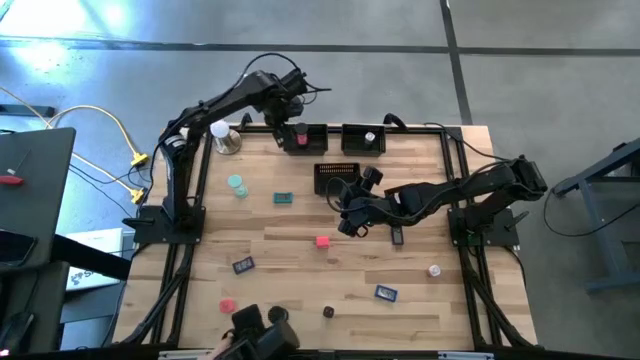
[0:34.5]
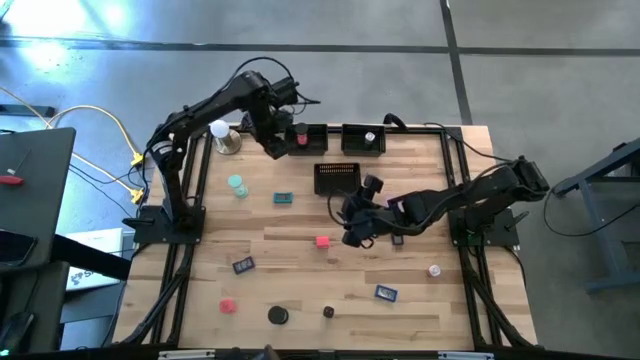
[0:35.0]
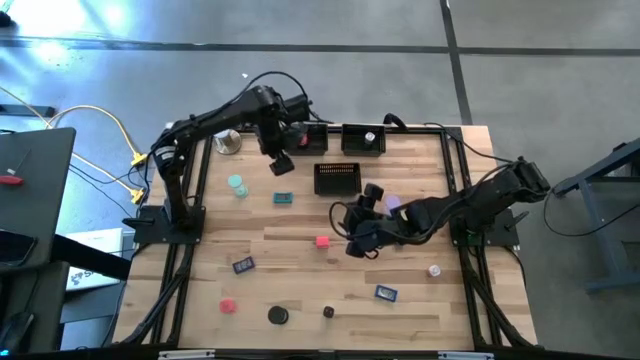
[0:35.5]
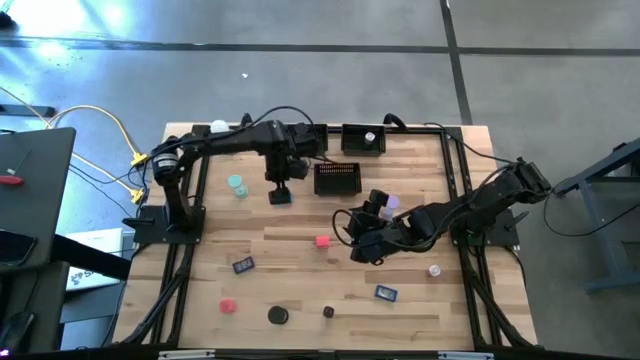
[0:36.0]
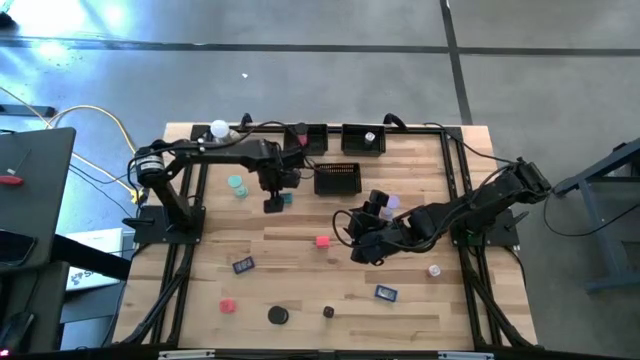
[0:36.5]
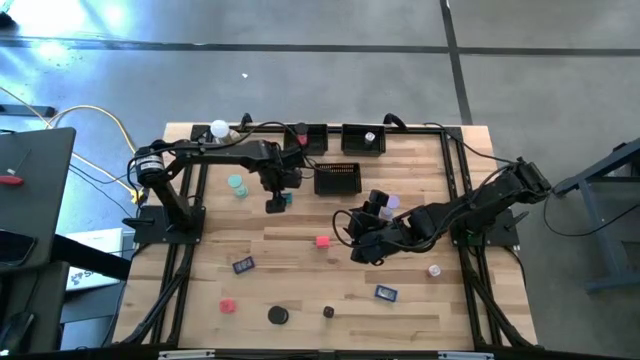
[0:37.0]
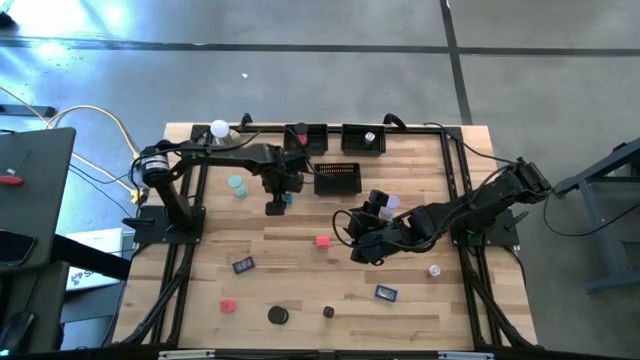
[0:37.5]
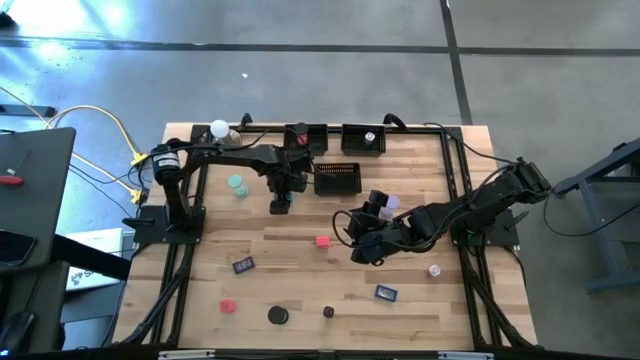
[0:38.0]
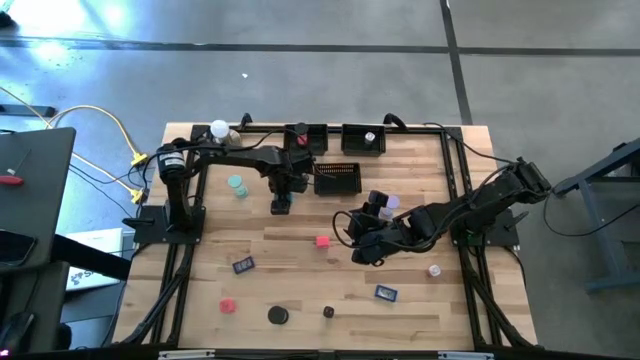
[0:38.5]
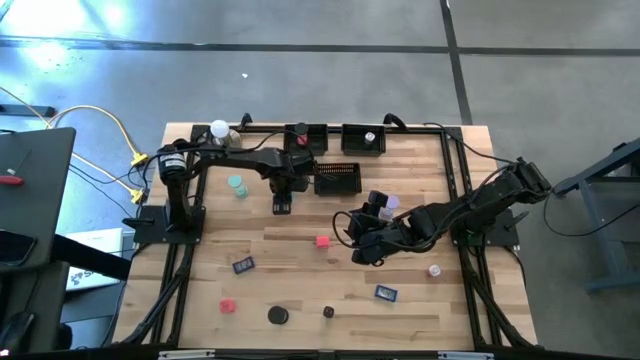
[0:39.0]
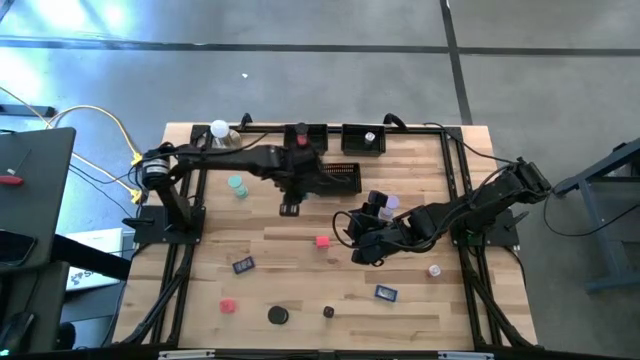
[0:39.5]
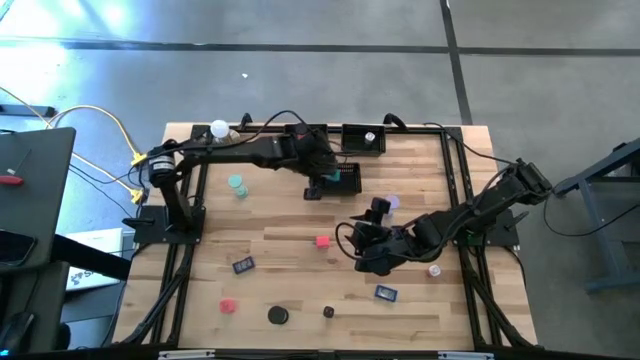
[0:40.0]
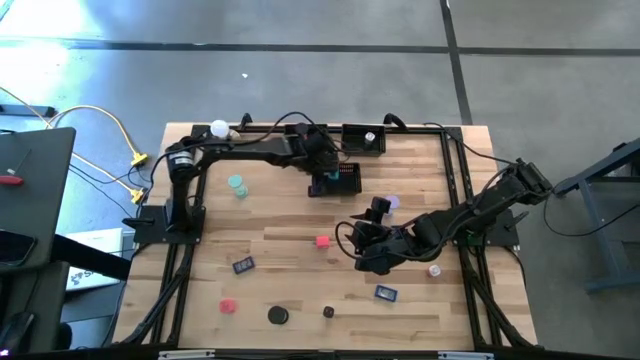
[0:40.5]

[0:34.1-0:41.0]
Task: Pick & Place Office items
Put the light blue digital timer into the bottom black bin

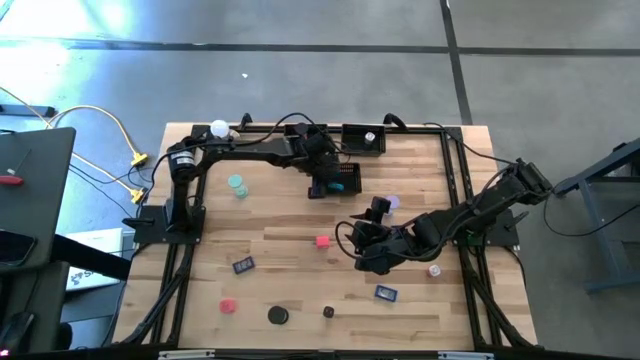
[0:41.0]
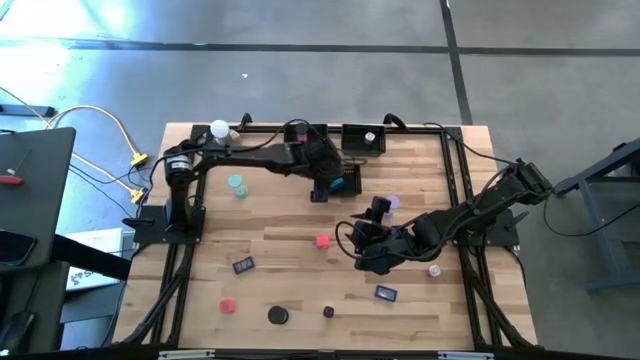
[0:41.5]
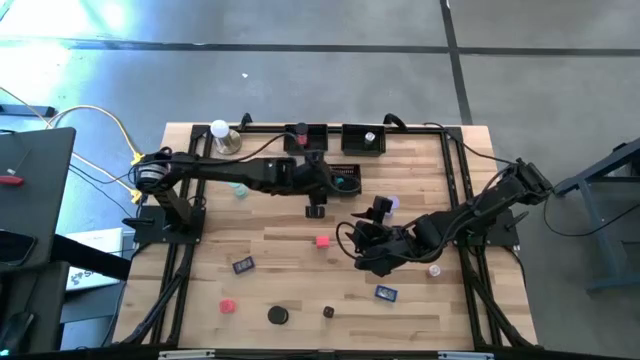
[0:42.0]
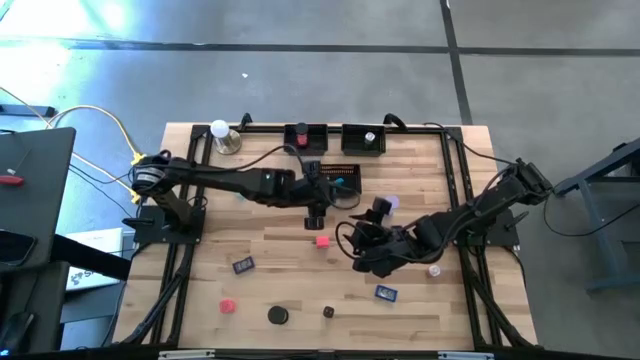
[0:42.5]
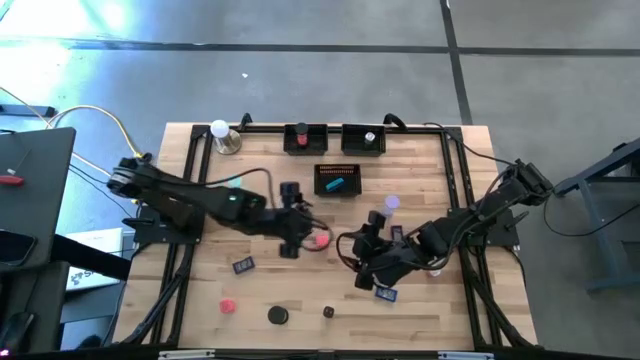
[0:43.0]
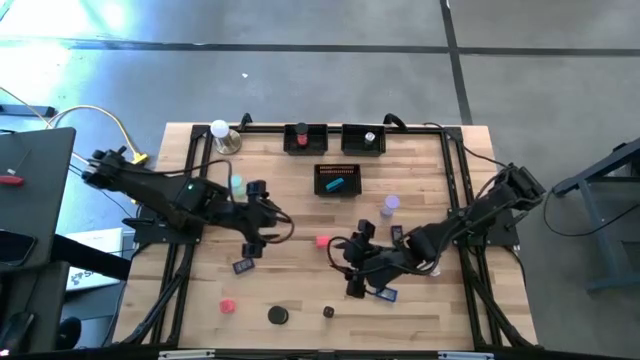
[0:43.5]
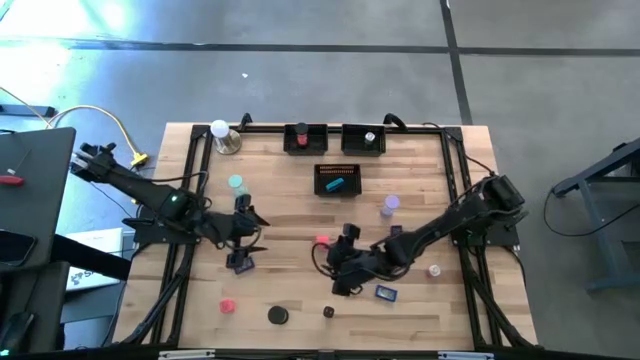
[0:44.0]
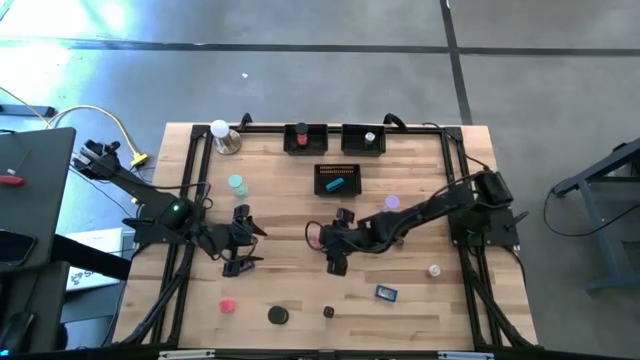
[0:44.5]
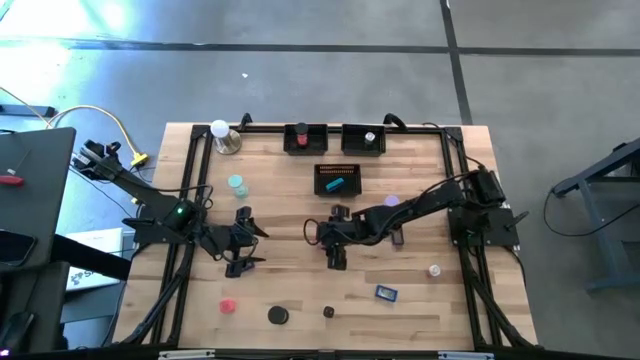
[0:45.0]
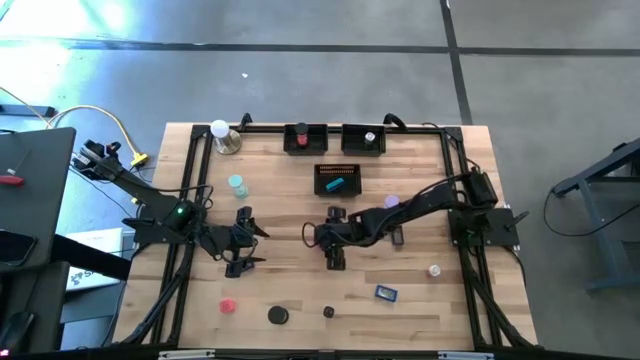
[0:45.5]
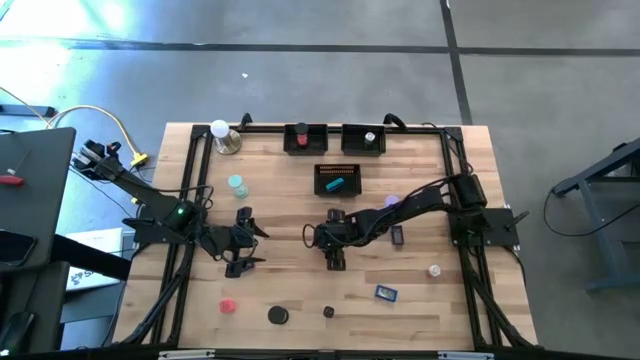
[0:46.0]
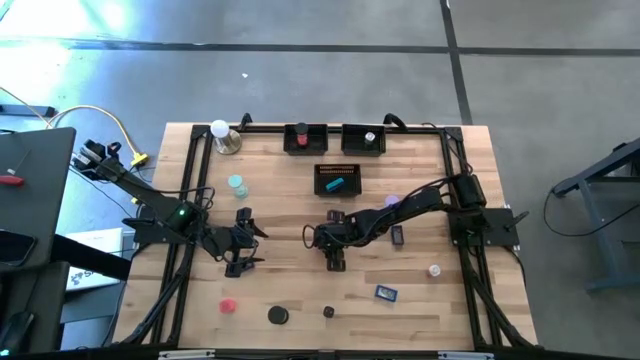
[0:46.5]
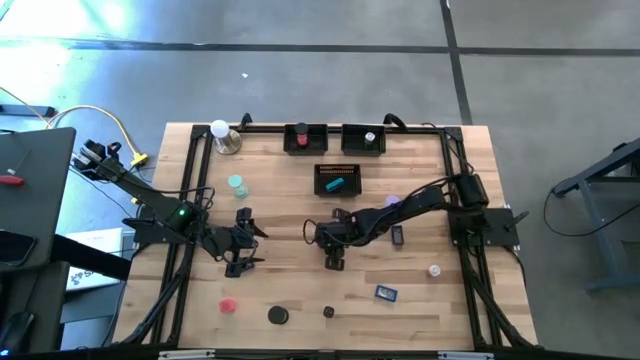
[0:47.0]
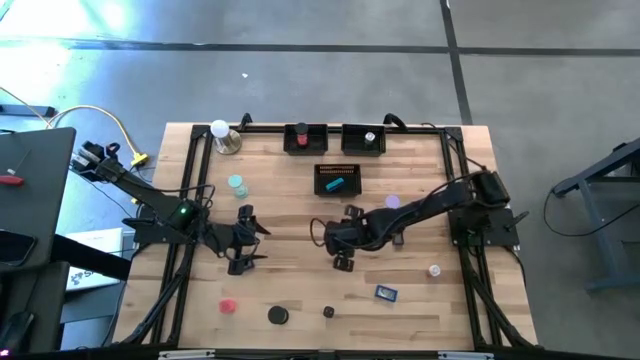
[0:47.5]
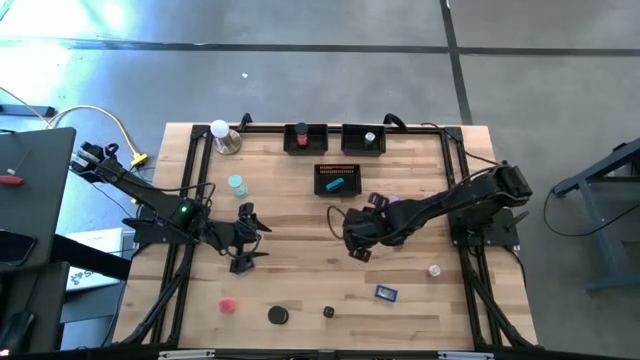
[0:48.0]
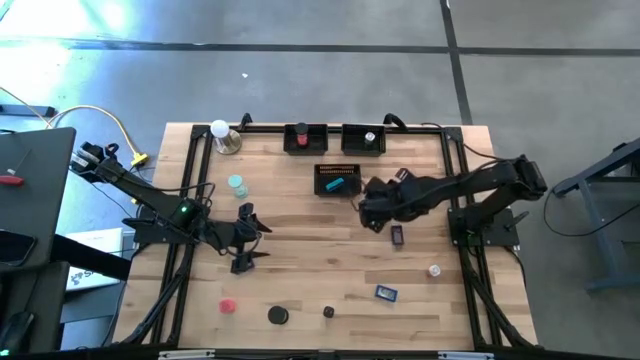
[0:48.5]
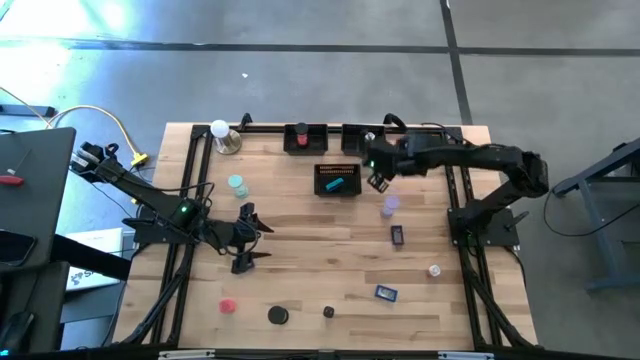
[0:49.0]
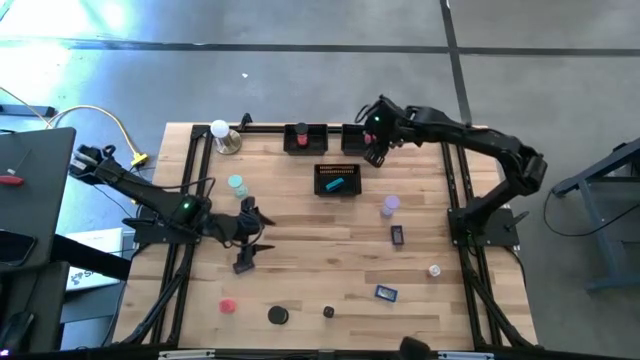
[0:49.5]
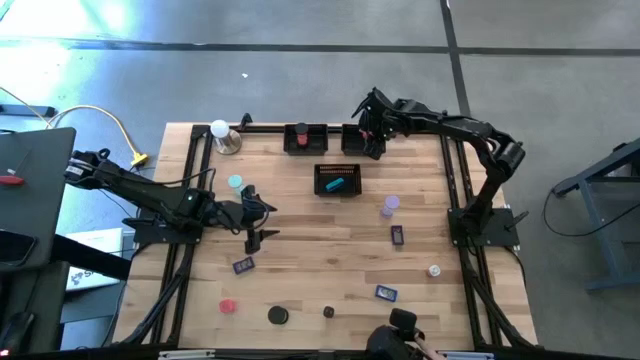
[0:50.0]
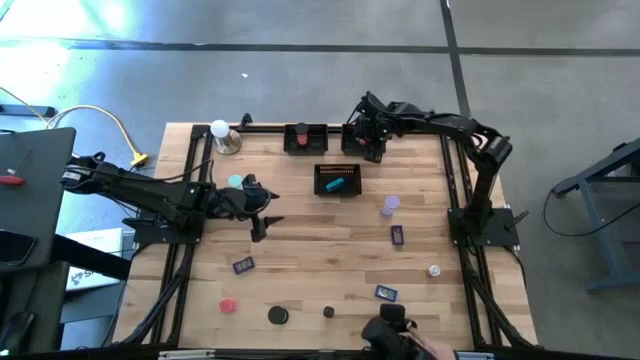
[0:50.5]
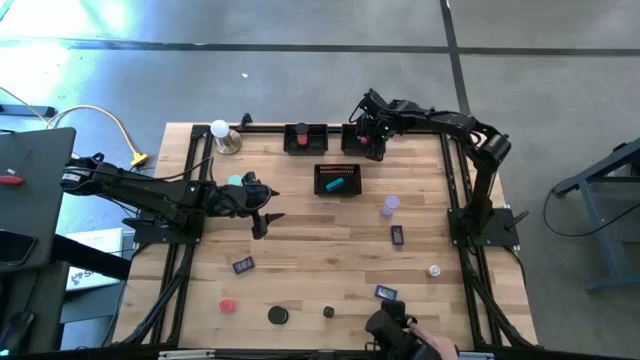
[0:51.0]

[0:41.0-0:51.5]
Put the top pink adapter charger into the top right black bin

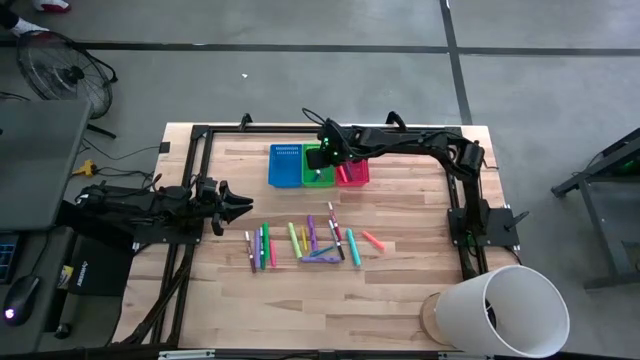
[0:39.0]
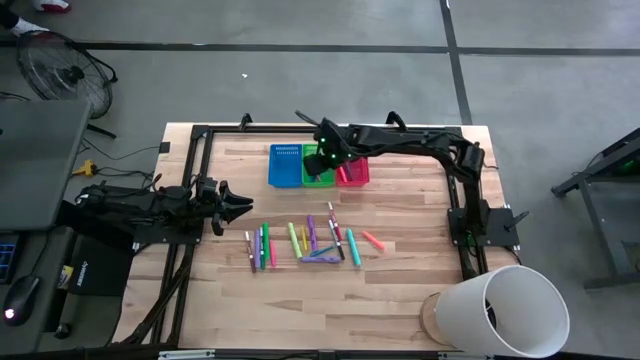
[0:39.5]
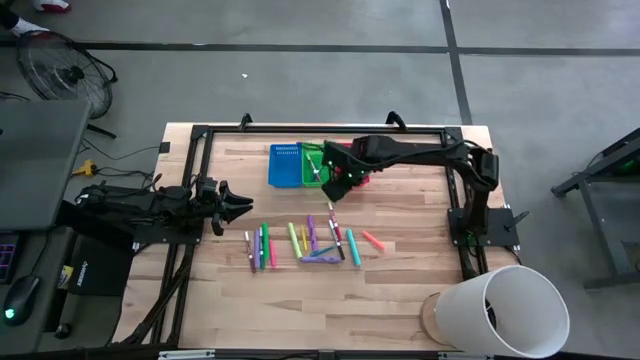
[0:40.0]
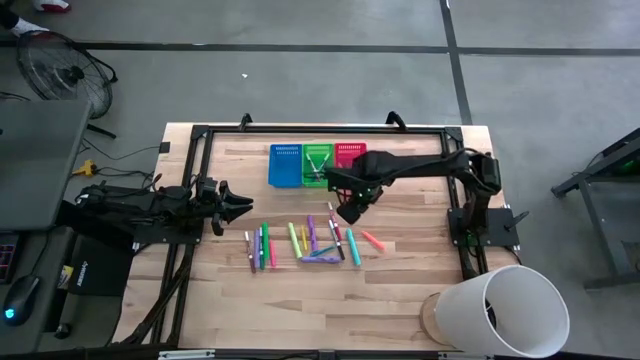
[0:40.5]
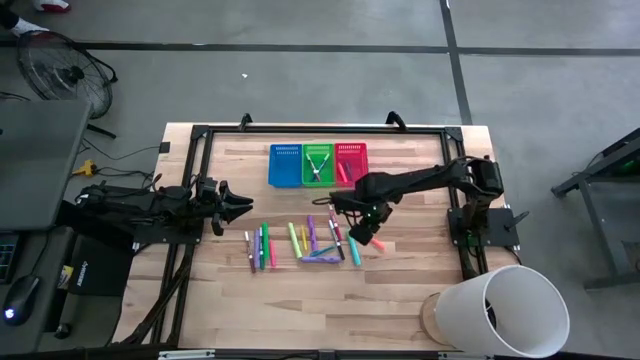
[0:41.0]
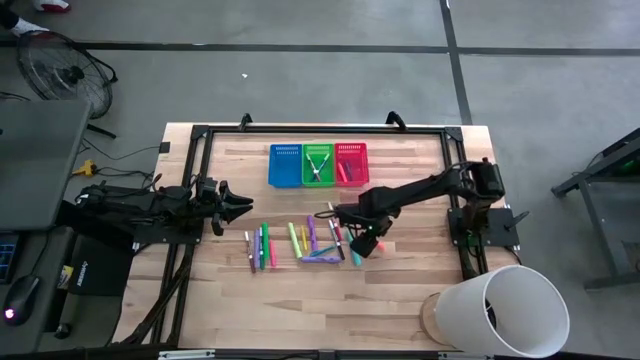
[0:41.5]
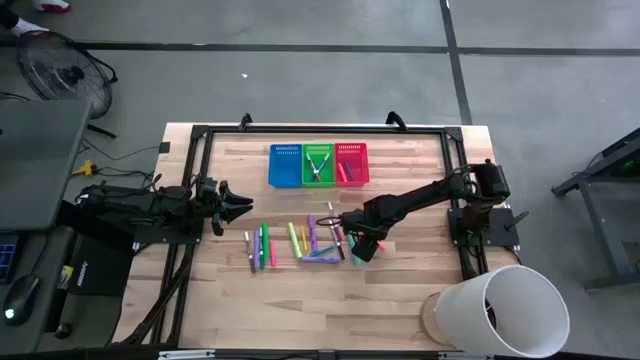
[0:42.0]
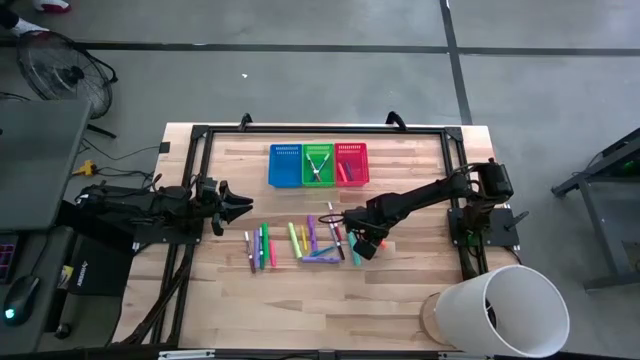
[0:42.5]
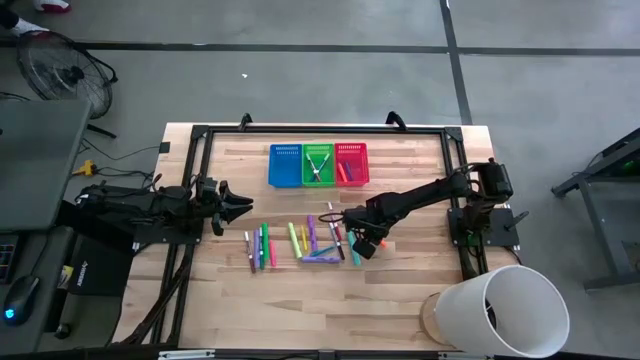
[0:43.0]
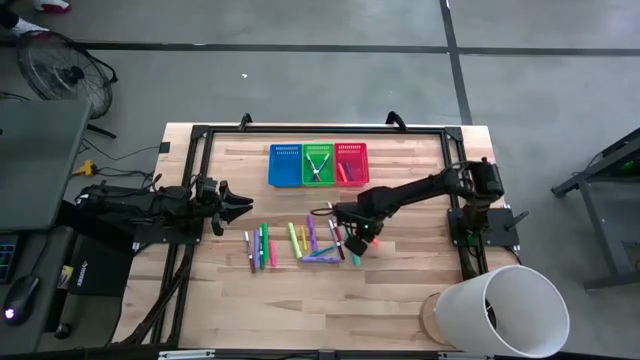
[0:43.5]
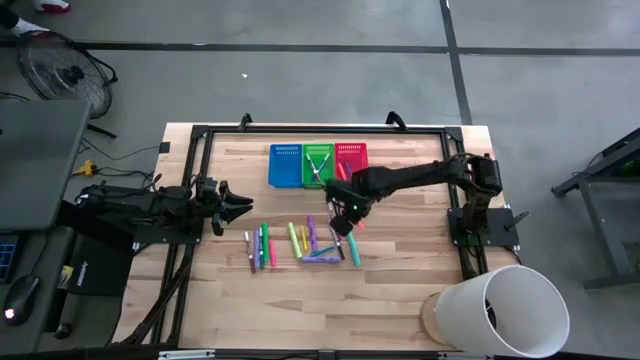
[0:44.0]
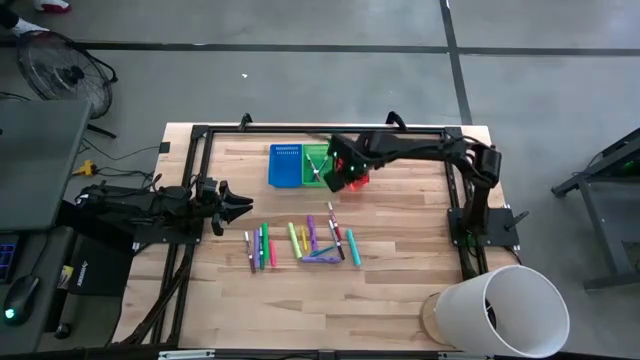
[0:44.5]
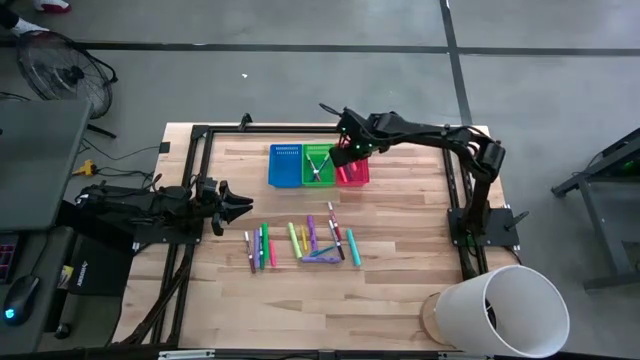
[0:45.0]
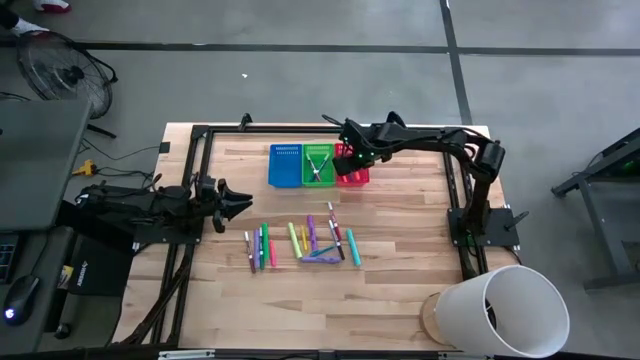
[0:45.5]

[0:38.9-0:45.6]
Task: Pick & Place Markers
Put the orange highlighter into the red bin
